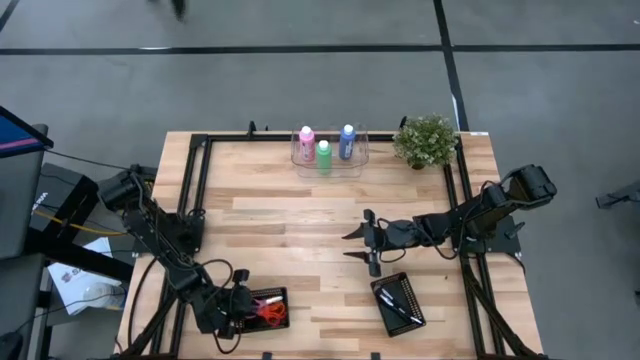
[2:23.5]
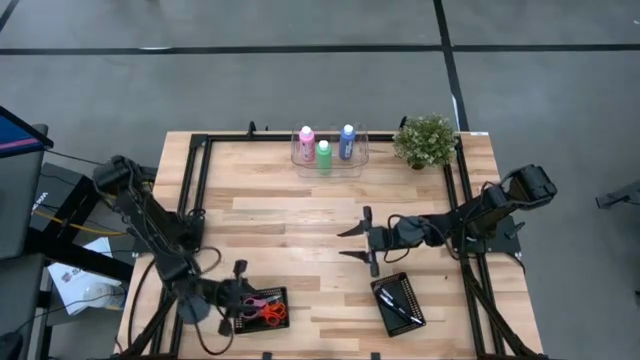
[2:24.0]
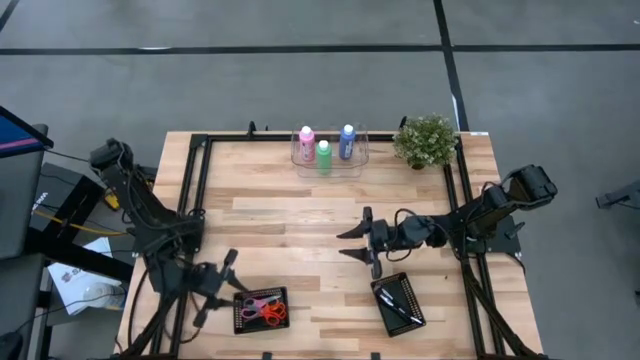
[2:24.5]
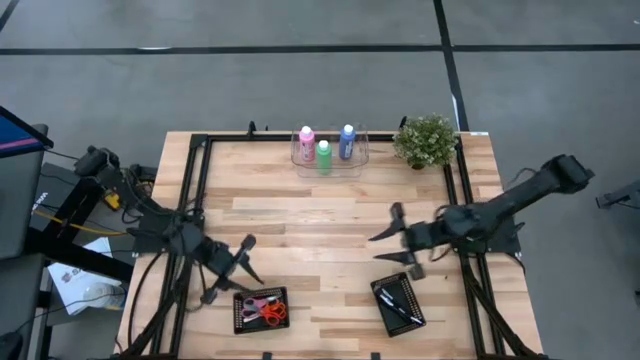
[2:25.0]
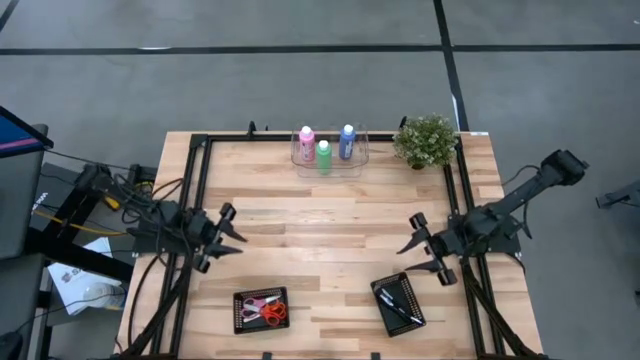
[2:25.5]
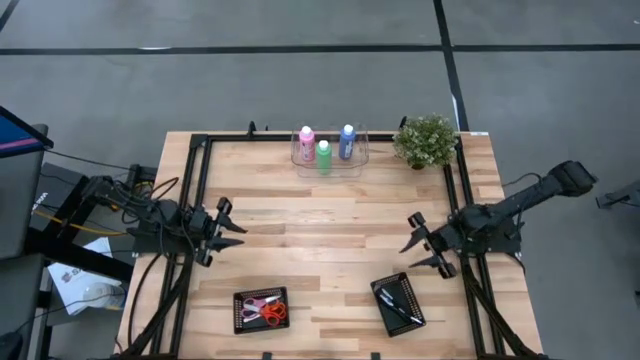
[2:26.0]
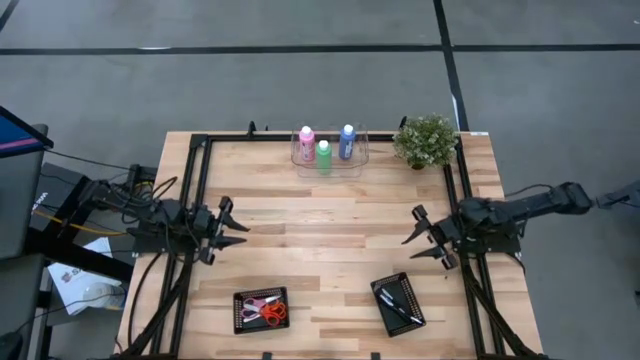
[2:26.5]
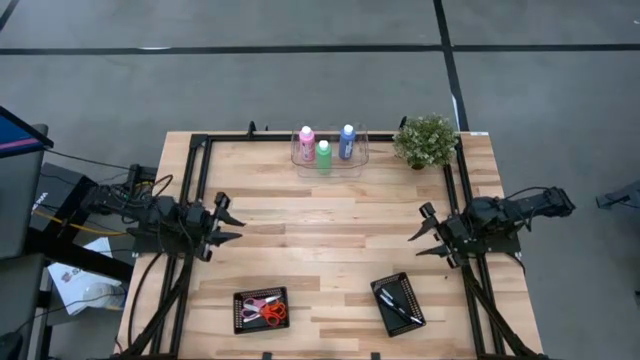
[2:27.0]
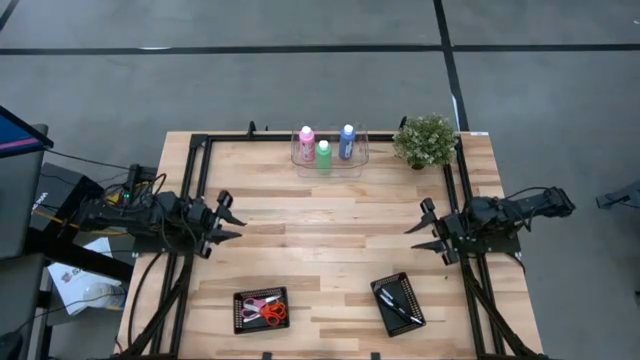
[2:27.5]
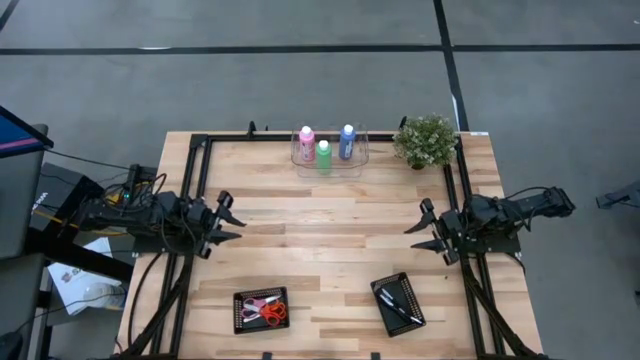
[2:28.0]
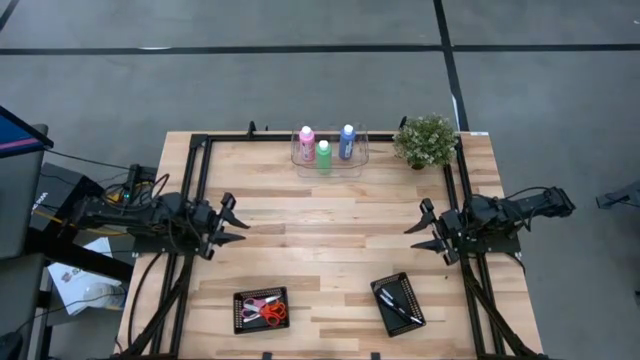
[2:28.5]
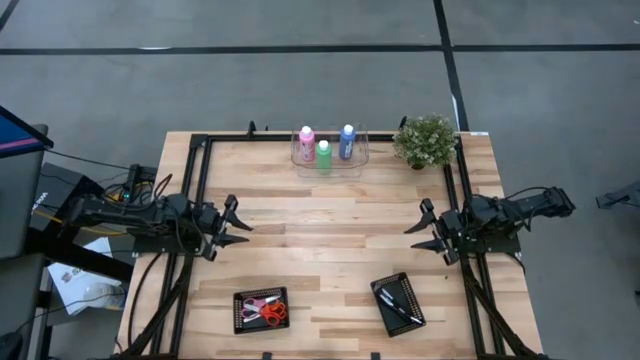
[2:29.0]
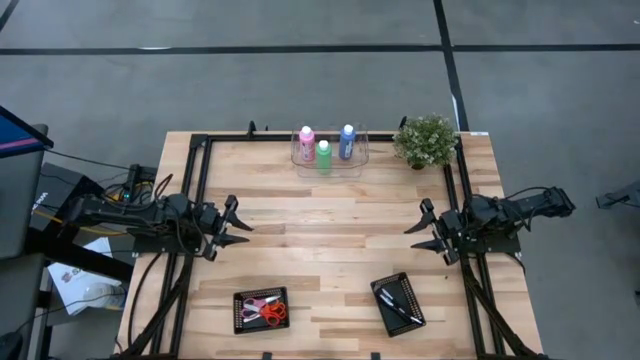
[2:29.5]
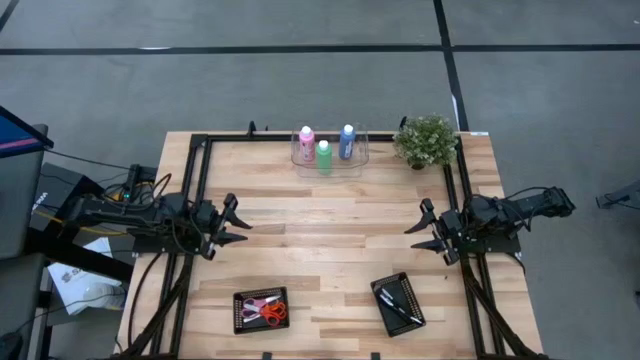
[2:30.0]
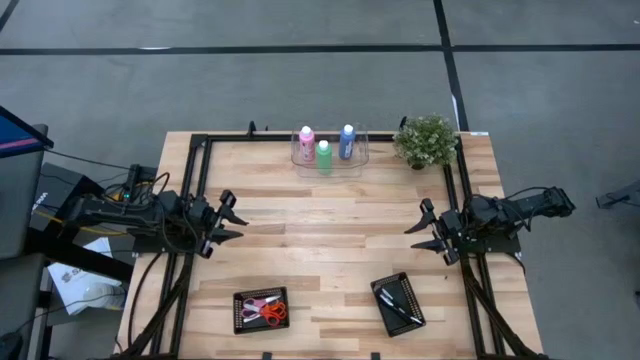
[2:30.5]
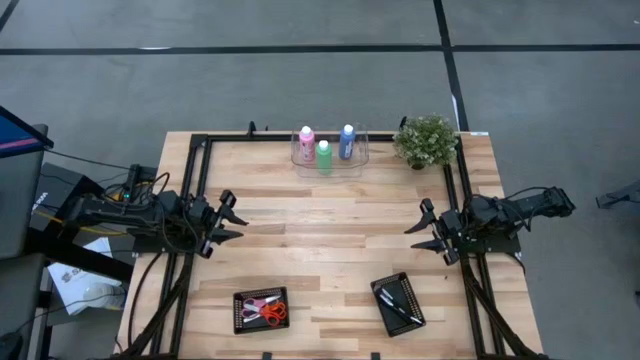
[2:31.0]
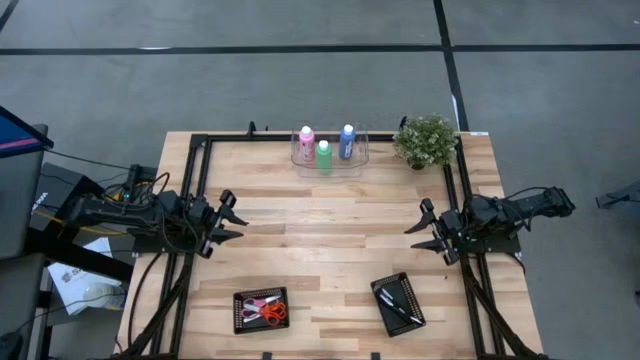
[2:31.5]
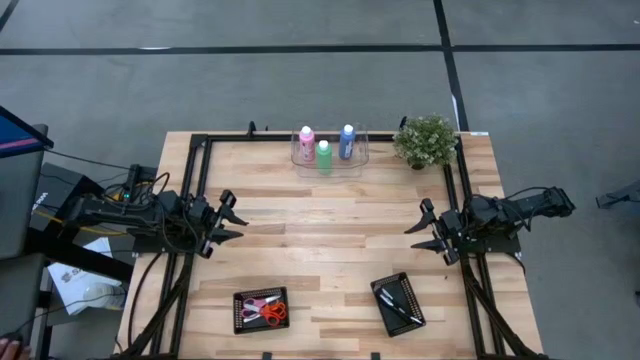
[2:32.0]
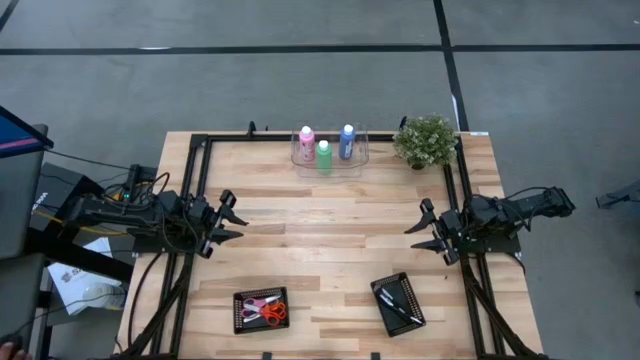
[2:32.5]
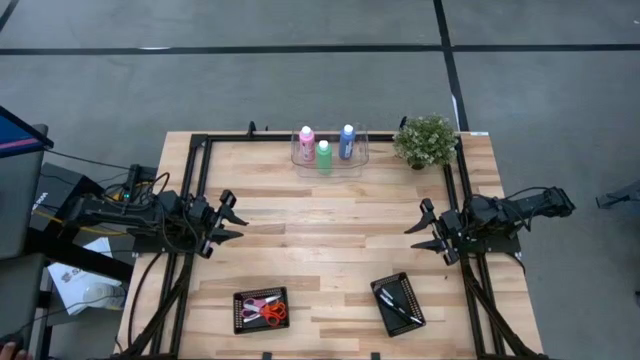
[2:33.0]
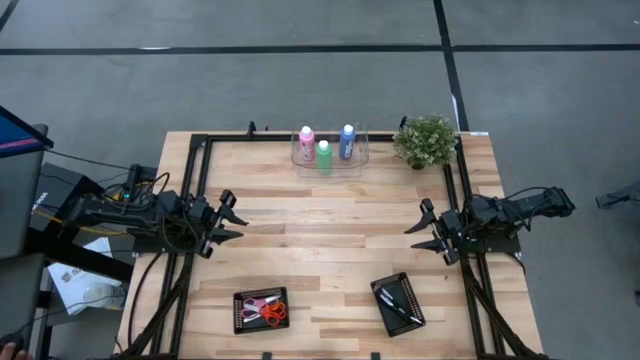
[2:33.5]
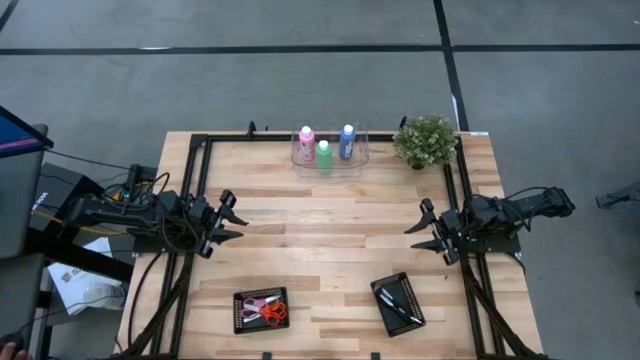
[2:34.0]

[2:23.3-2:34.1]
Task: Pick & Place Paint Supplies
Return to Home Position

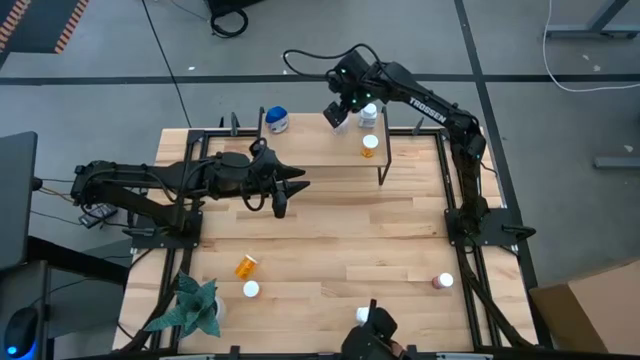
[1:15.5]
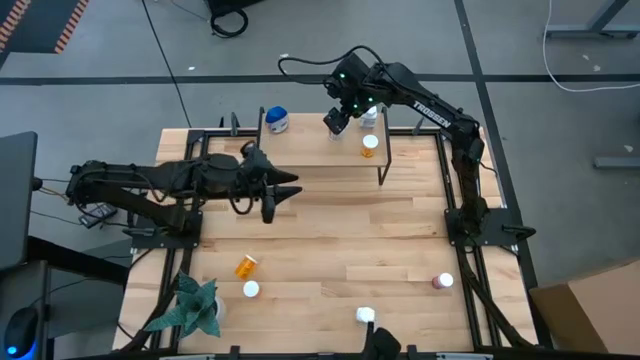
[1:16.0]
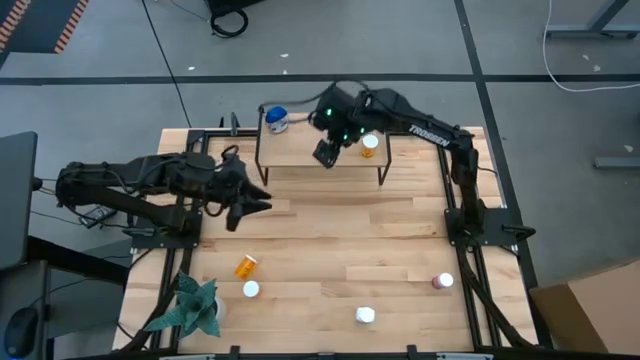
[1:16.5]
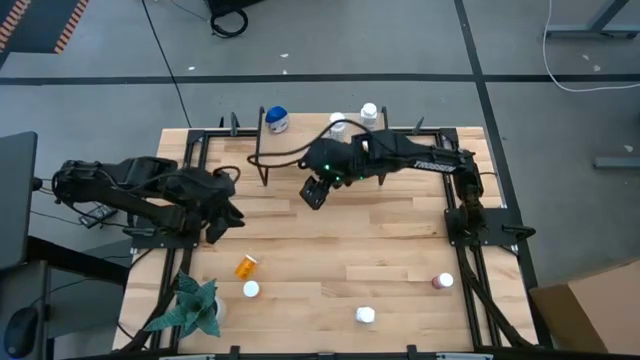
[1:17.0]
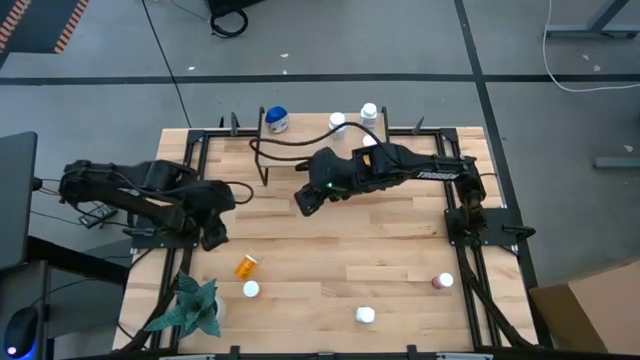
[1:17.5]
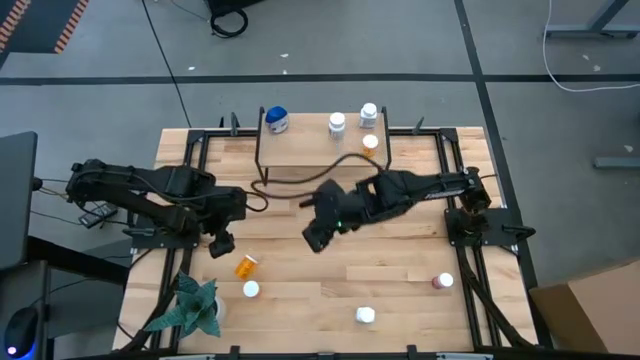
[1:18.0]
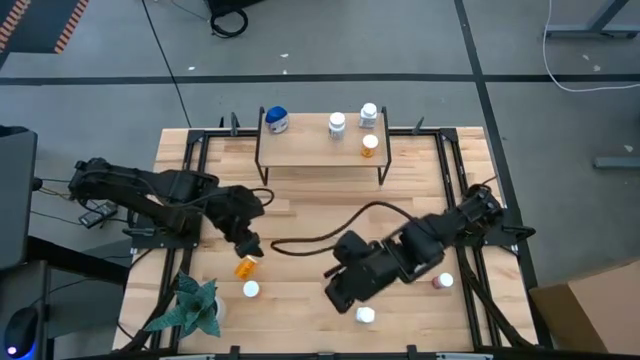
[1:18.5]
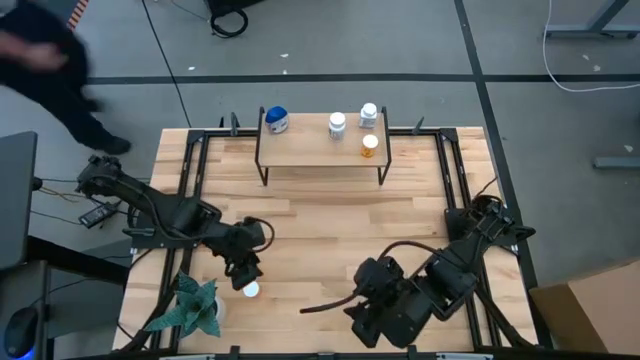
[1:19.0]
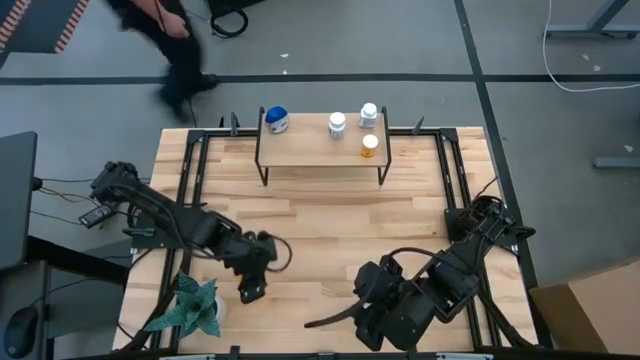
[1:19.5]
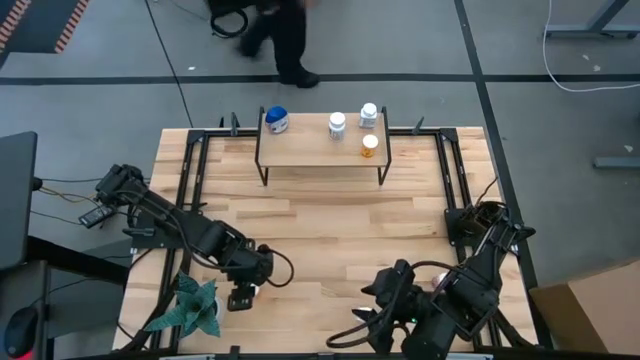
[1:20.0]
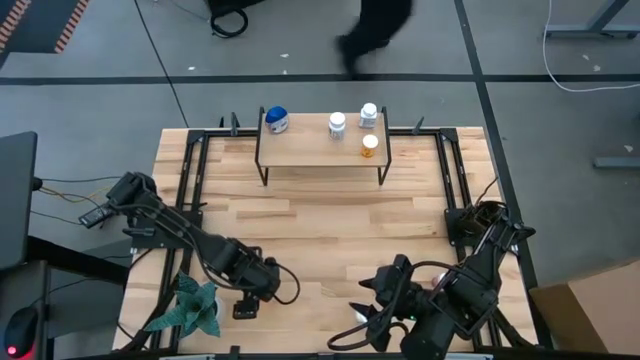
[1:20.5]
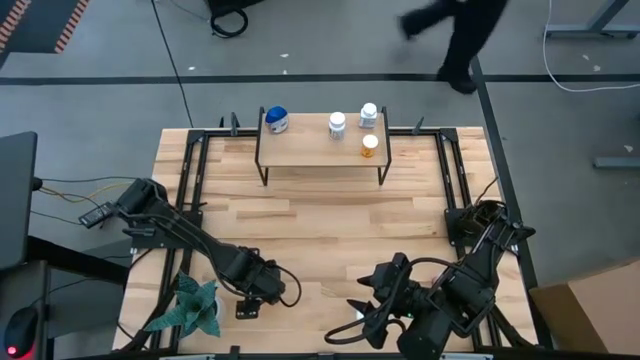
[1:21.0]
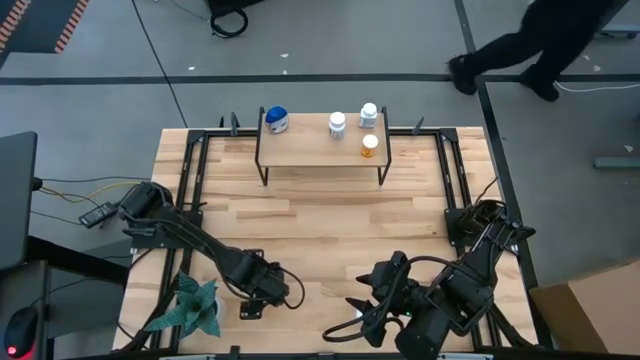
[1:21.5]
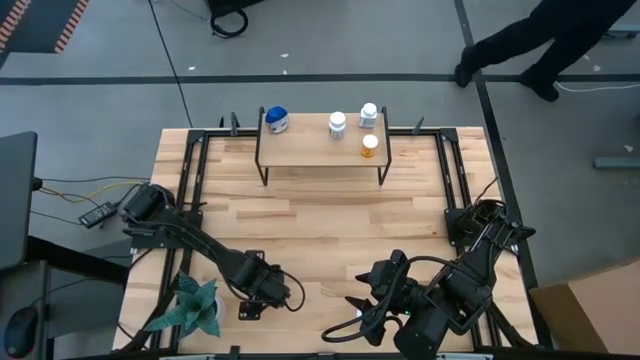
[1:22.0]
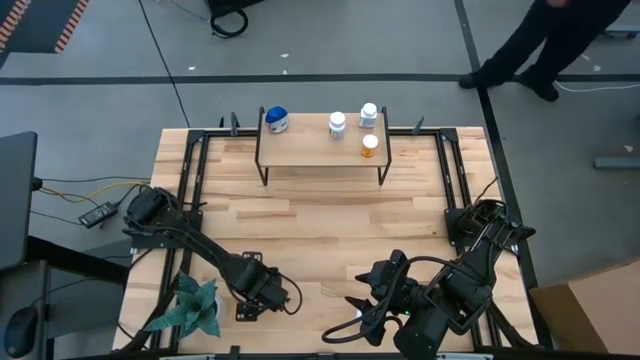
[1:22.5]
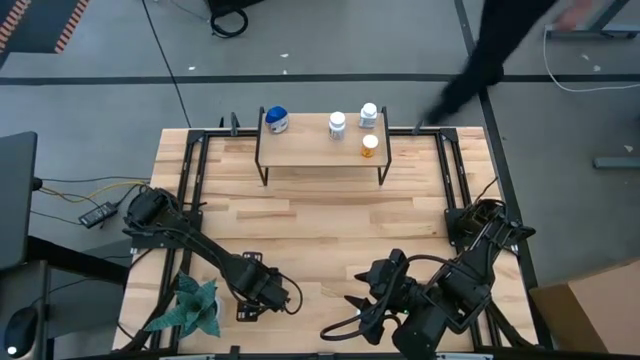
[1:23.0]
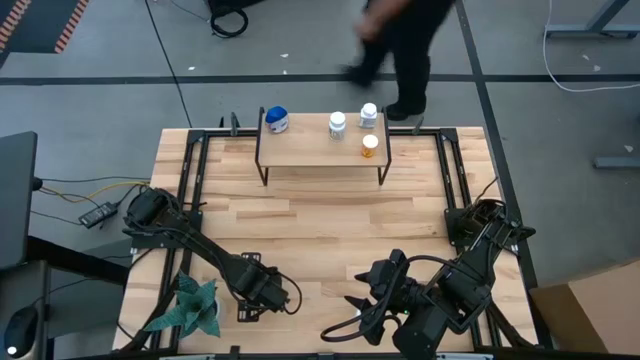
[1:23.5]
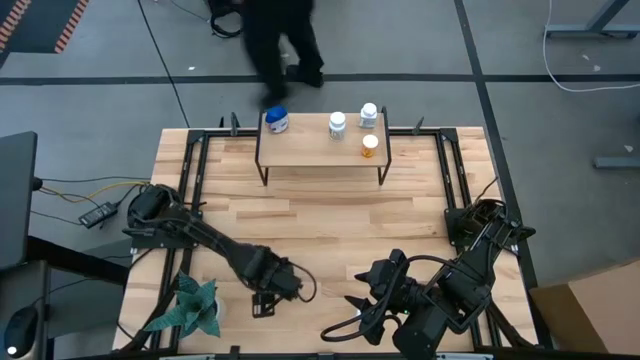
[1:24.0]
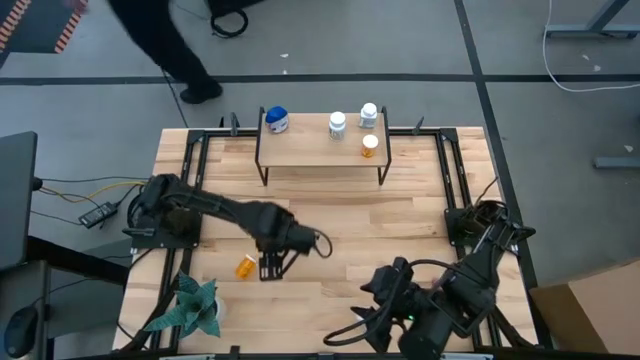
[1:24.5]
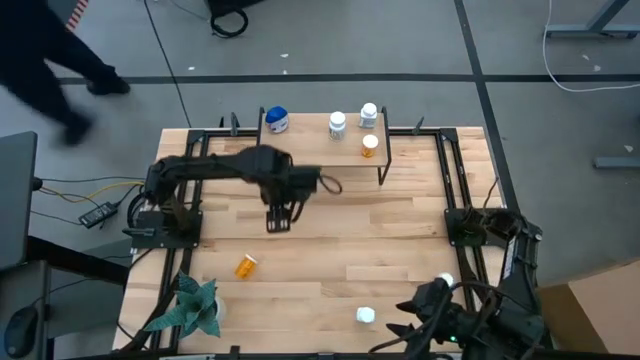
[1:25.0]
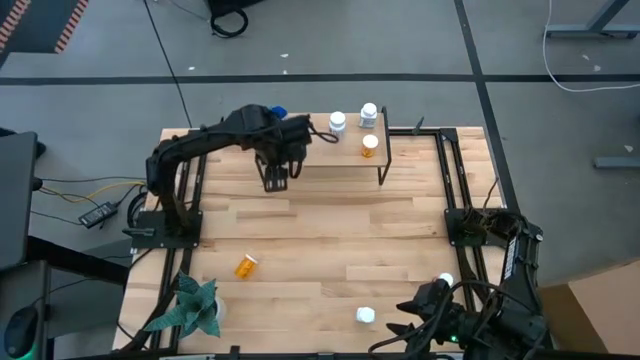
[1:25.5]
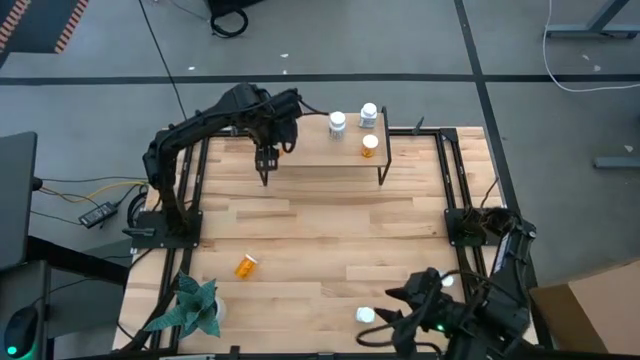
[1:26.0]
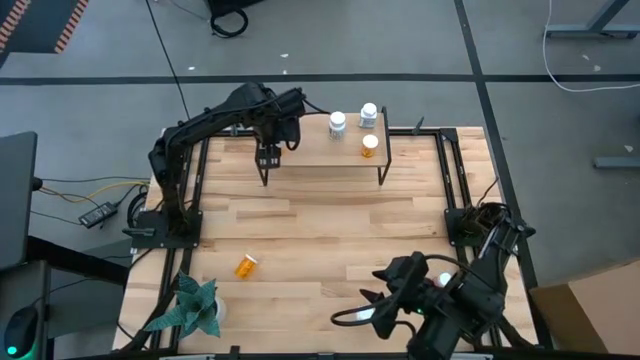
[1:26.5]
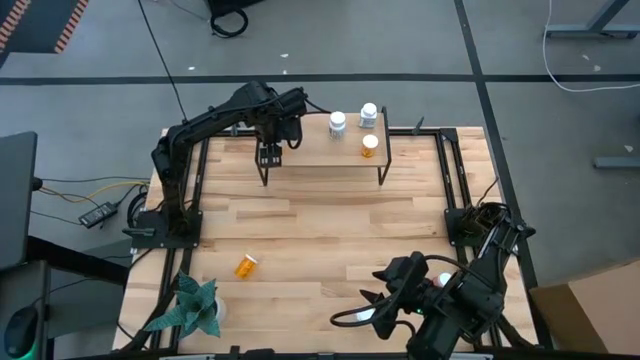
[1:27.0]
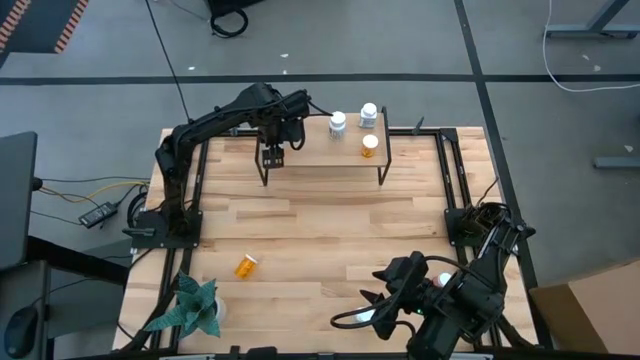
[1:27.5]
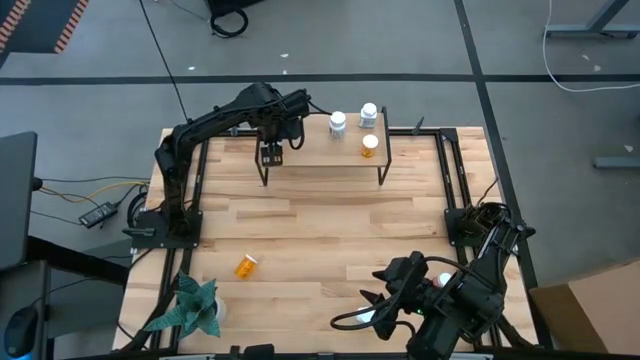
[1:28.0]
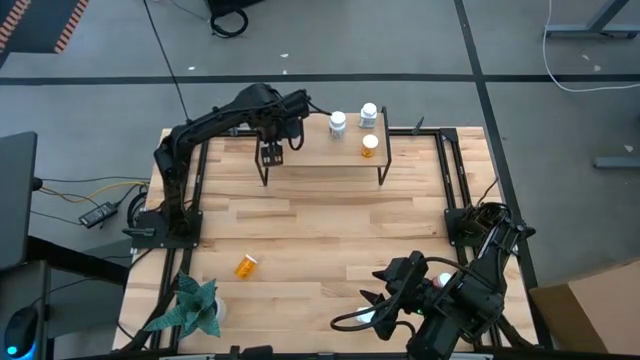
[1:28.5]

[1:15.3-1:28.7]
Task: Pick and place medicine bottles onto shelf by color
Put the bottom orange pill bottle on the shelf
